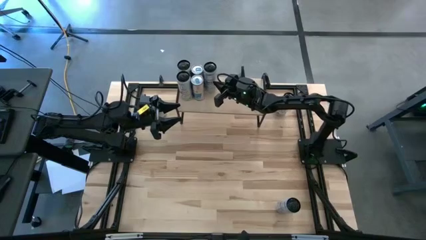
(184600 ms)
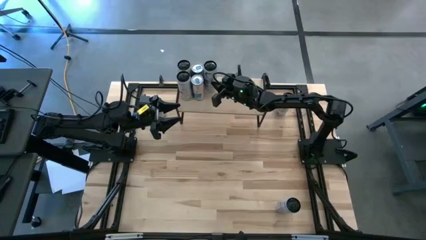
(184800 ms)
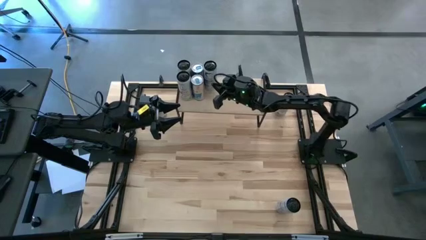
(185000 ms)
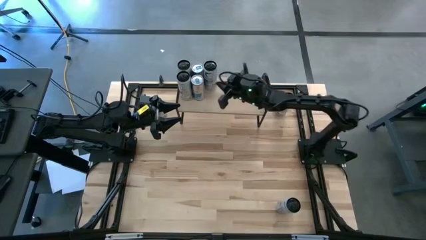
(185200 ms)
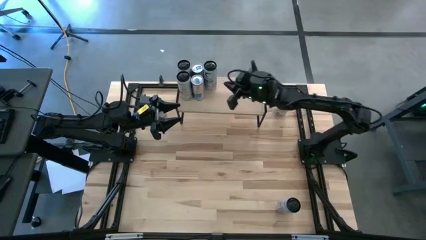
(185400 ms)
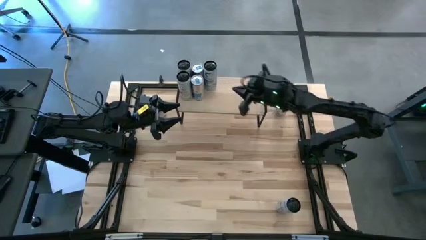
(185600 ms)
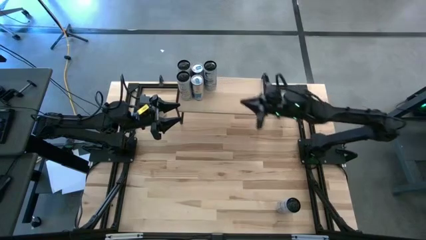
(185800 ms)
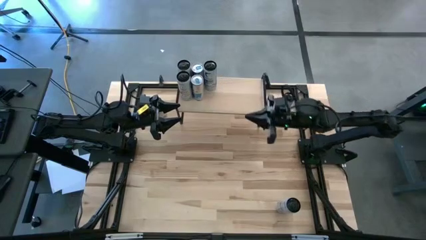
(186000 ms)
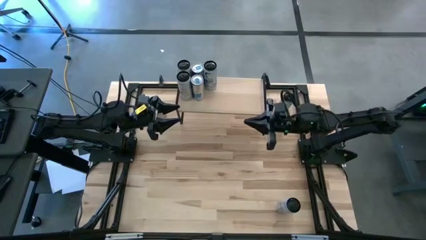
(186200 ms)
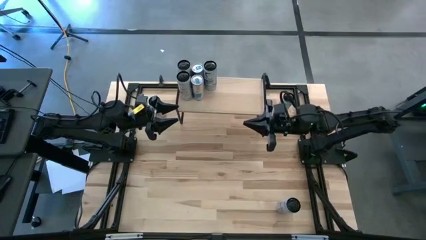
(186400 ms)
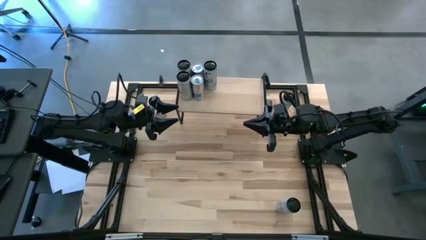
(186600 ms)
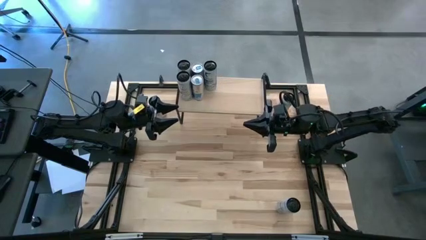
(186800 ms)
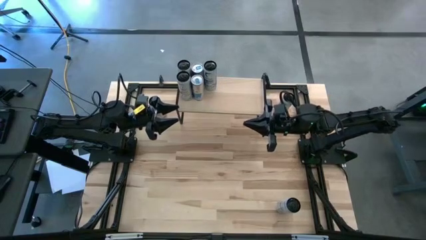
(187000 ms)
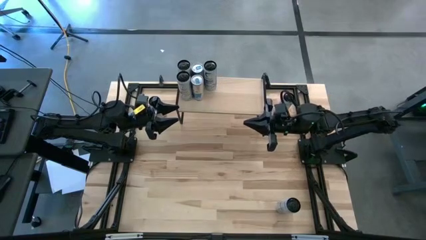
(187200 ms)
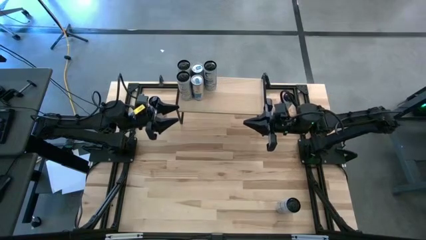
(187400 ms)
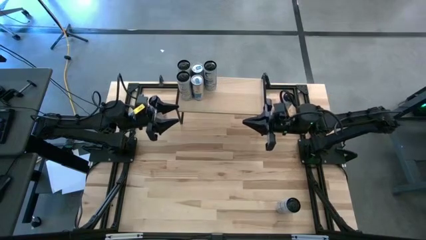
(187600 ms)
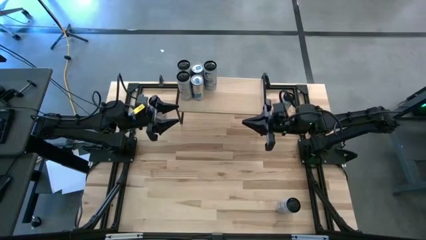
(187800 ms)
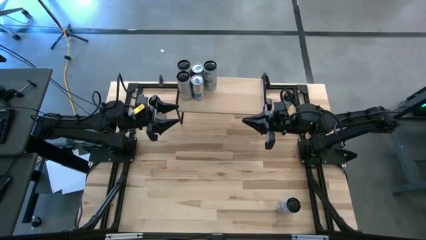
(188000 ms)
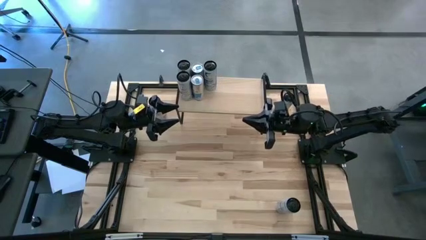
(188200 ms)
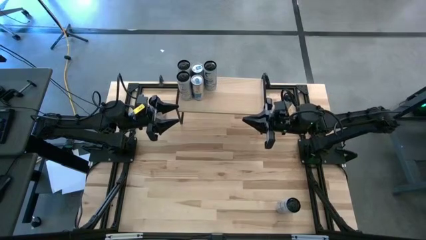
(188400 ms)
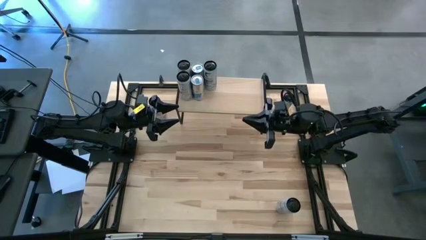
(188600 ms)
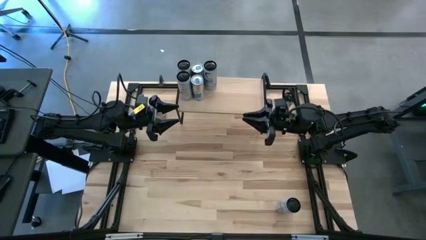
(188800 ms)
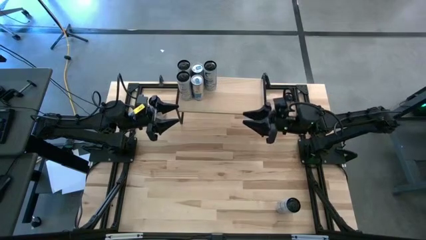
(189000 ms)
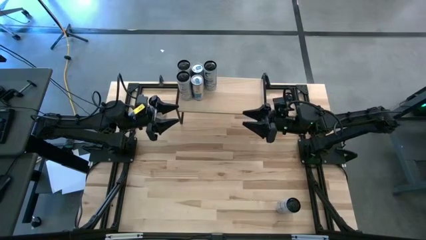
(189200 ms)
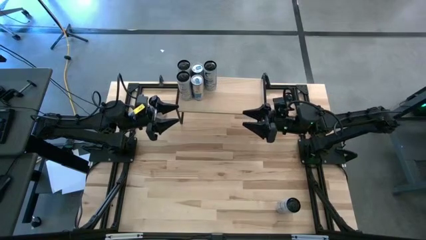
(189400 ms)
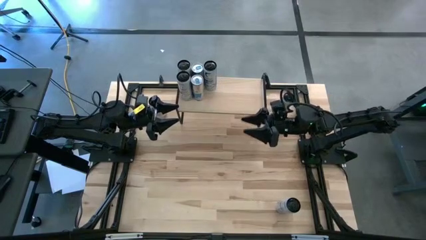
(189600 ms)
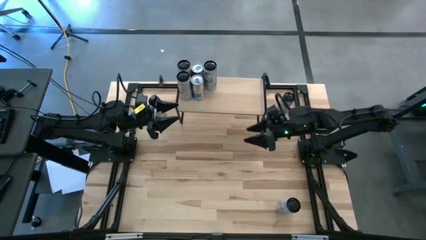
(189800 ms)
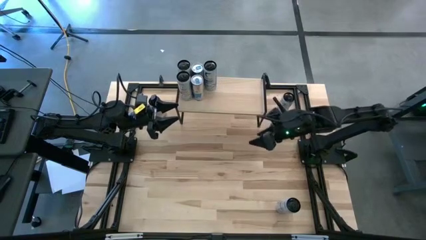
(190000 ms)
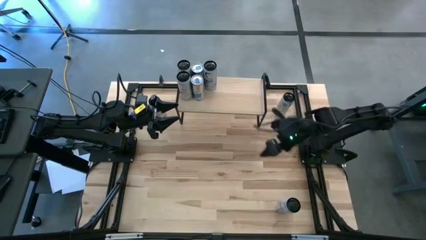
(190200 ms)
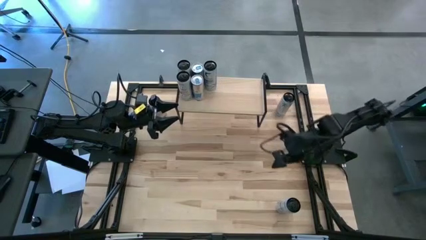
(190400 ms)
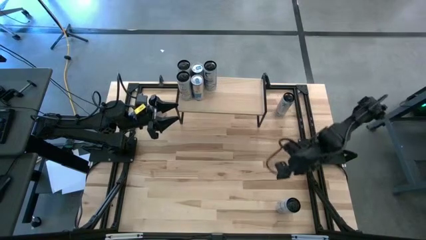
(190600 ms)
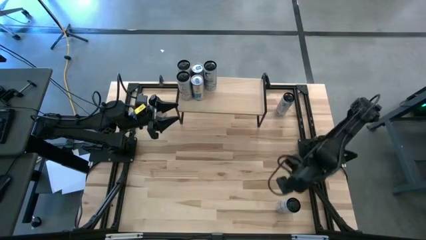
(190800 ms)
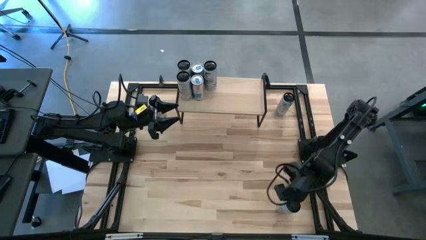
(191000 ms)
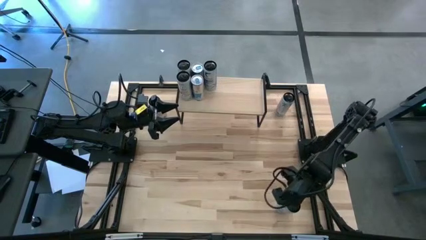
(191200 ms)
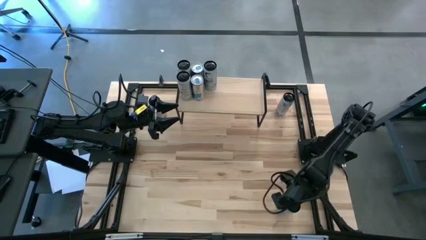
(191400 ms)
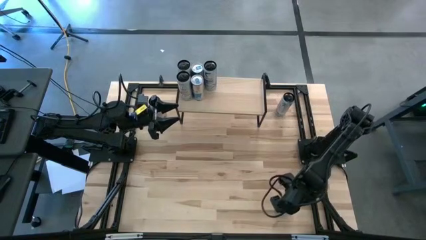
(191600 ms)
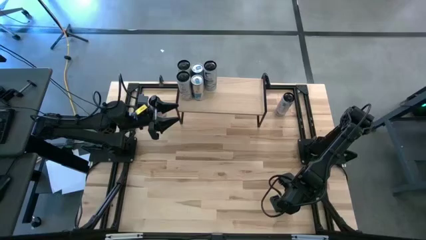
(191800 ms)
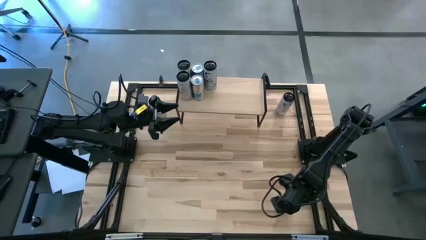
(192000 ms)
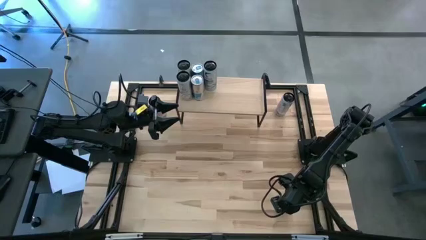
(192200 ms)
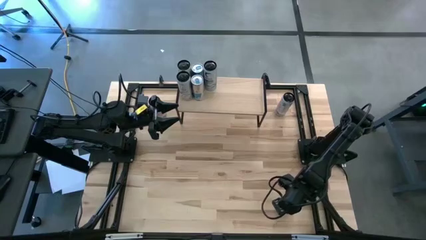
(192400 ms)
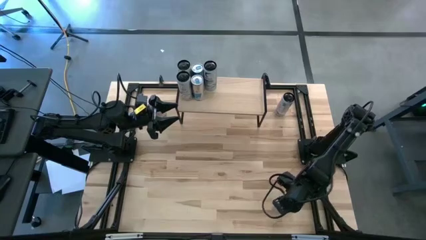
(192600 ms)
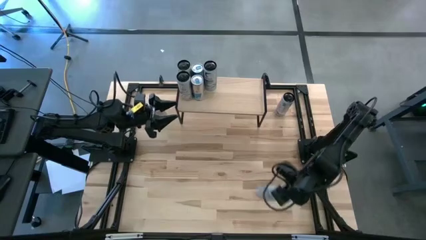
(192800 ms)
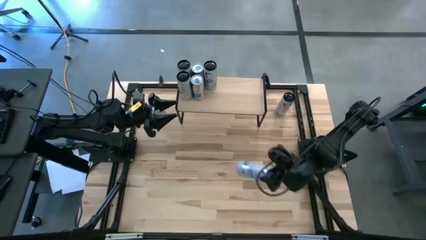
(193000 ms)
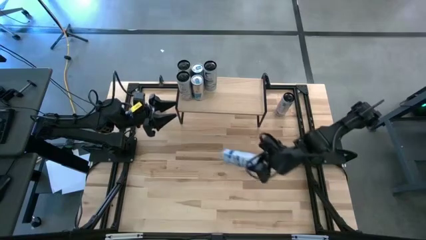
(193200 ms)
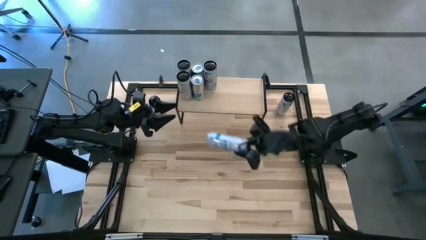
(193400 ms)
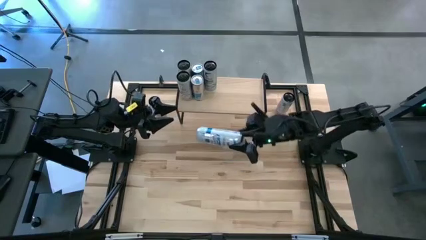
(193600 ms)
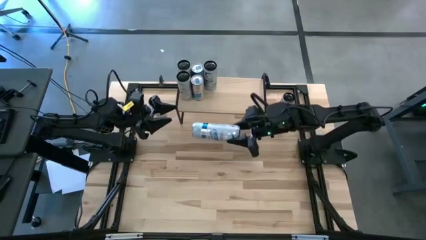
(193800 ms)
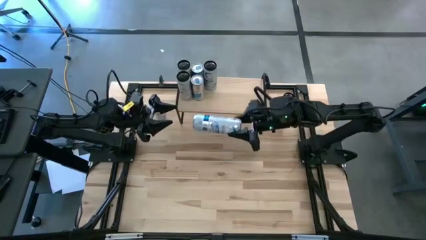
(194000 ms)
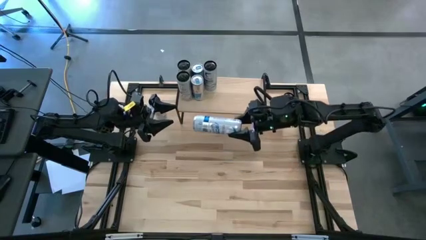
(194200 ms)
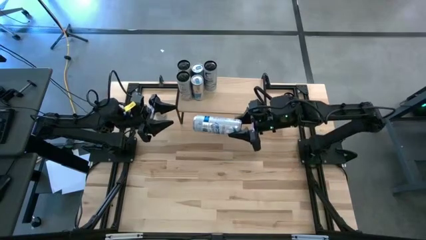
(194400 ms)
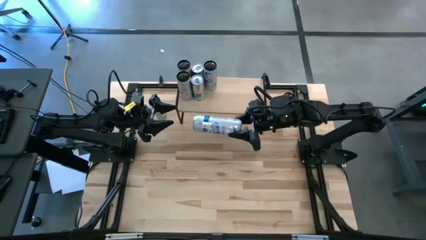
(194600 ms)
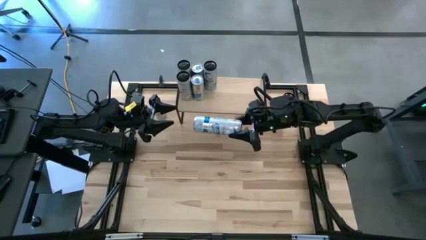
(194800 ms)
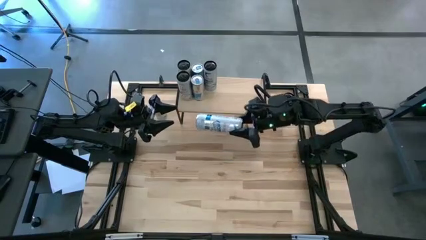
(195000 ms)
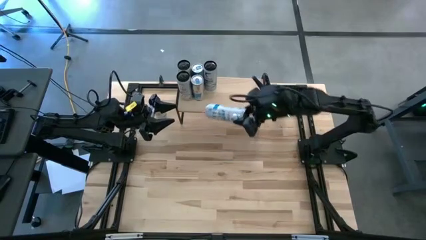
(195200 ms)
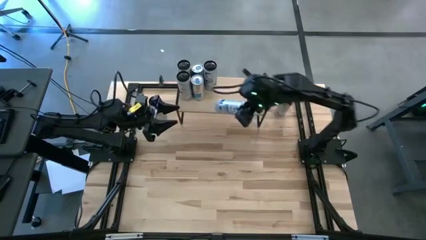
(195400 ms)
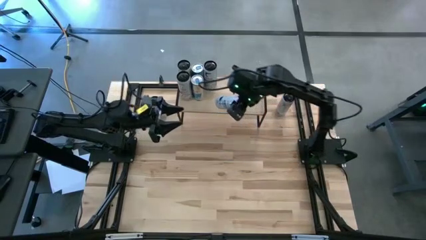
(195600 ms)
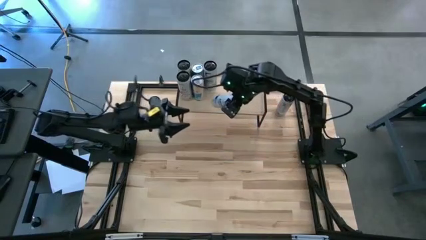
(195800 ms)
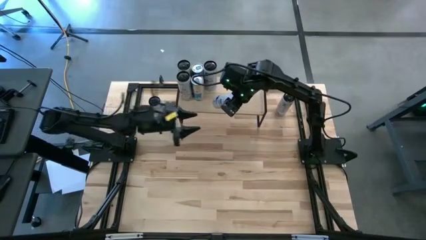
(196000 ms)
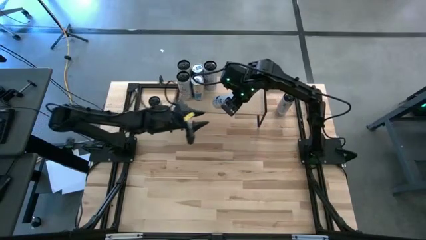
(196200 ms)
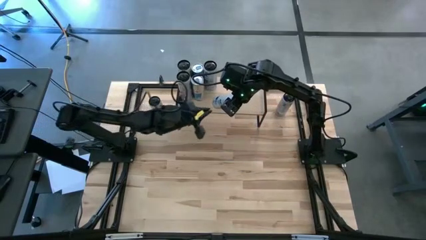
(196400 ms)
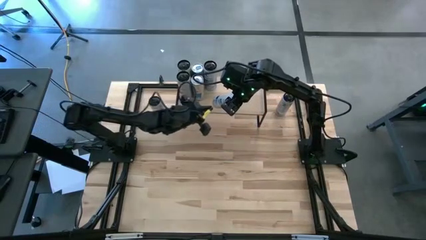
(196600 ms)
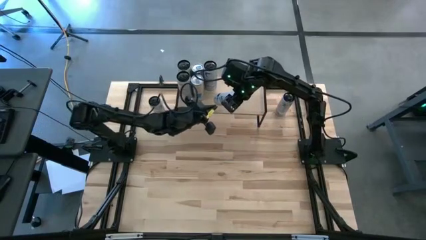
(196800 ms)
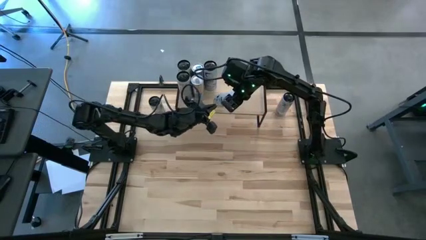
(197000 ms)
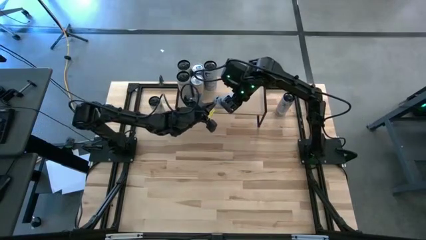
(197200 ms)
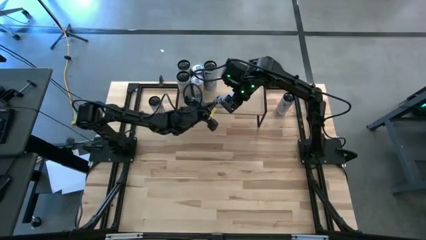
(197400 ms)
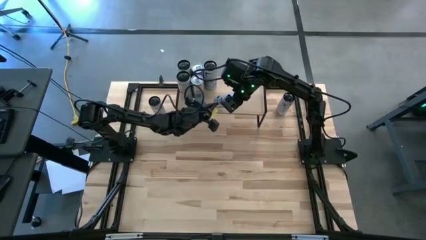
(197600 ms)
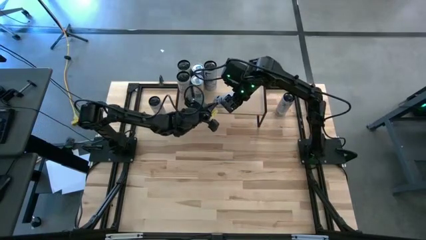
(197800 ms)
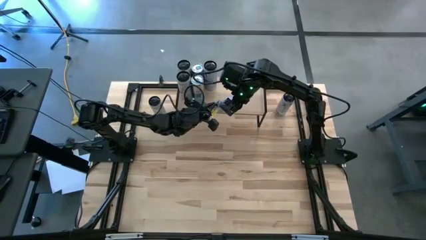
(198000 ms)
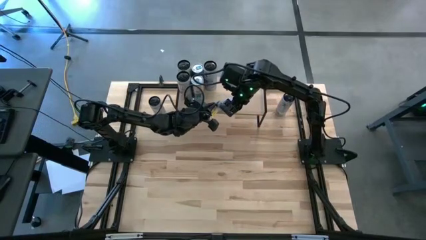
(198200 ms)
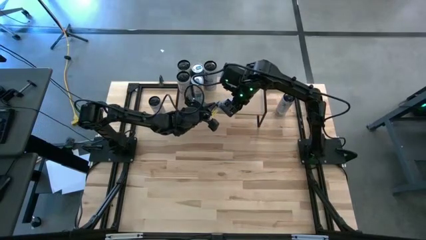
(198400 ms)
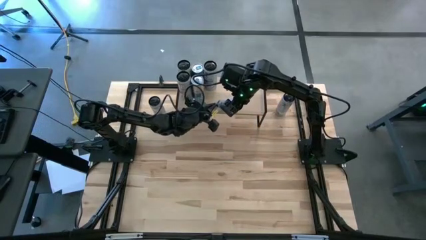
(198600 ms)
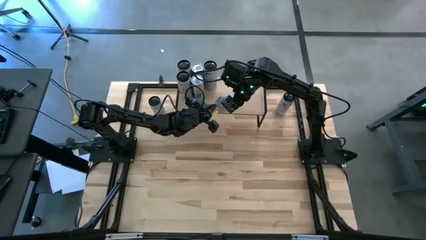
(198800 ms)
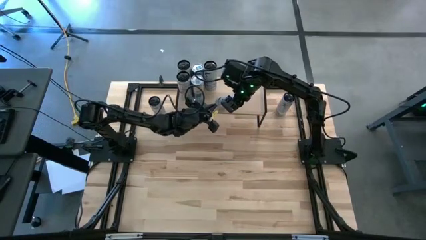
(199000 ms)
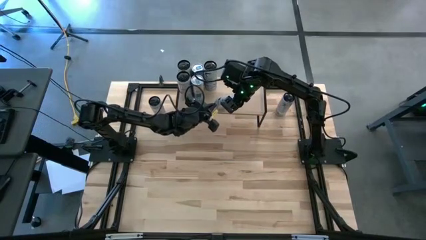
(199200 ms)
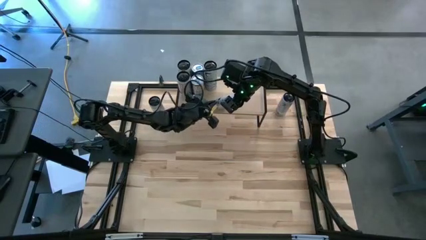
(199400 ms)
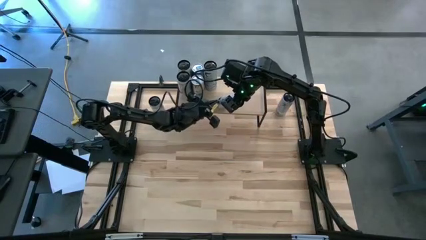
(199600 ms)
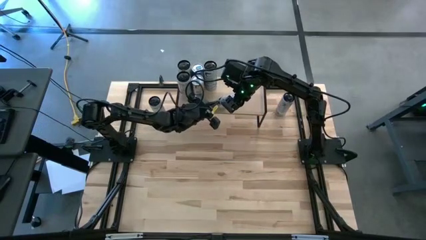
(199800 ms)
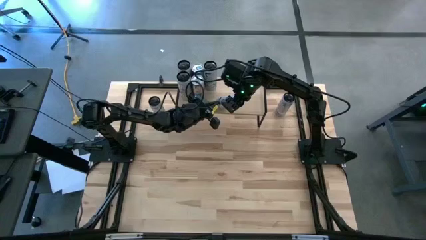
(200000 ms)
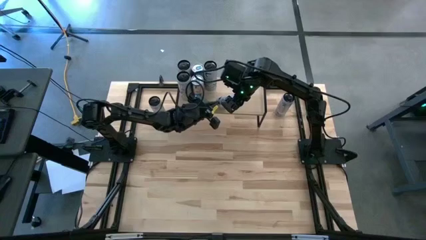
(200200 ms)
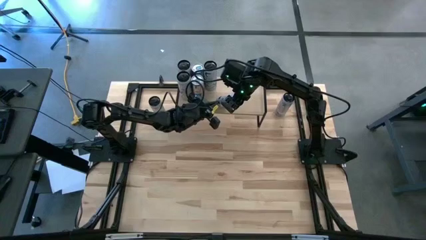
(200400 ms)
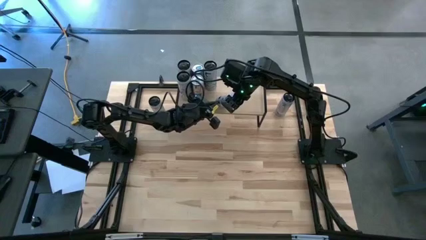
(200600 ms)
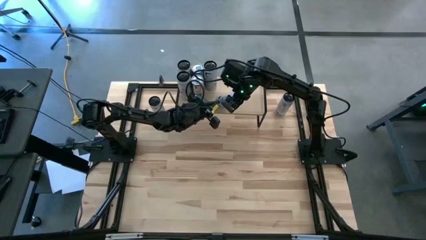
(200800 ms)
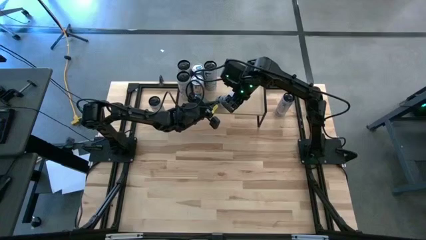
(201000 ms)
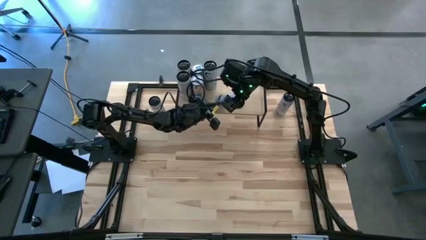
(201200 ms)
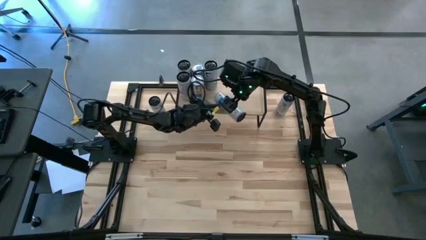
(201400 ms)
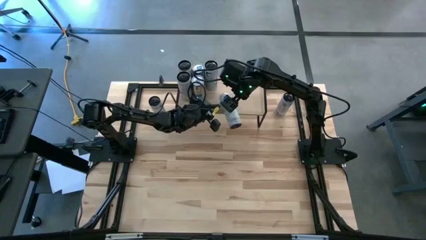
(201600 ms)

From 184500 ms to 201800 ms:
Task: Place canned beverage on shelf
Put the bottom right black soda can on the shelf
